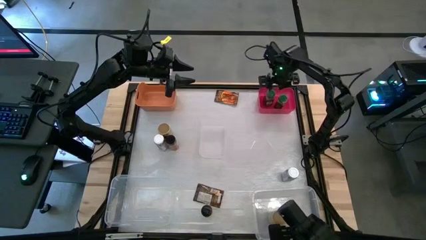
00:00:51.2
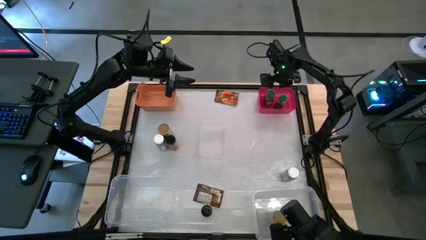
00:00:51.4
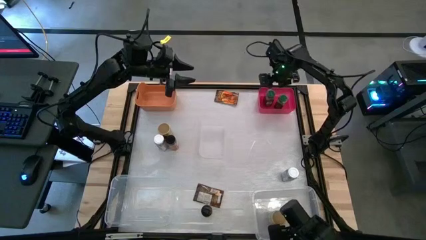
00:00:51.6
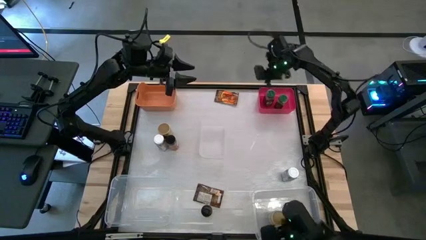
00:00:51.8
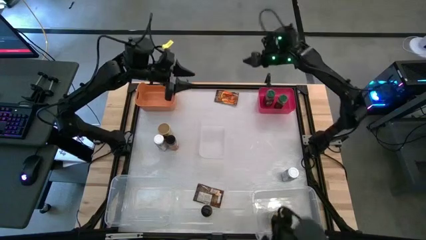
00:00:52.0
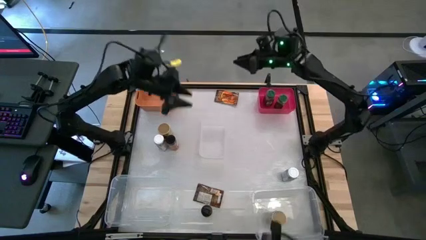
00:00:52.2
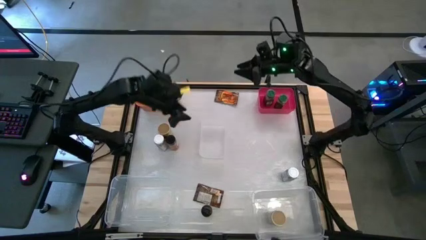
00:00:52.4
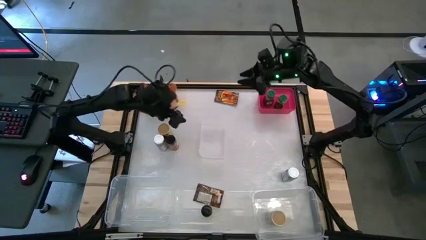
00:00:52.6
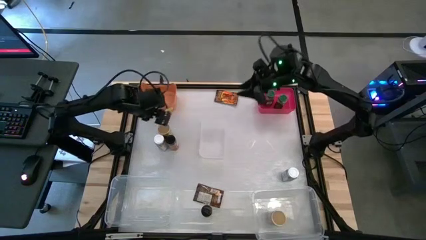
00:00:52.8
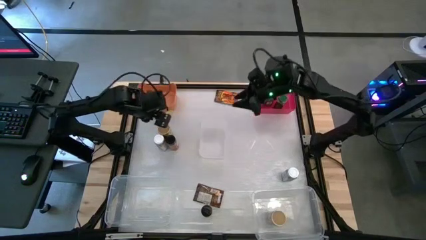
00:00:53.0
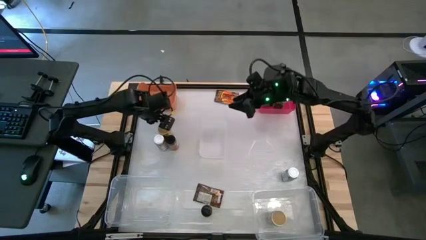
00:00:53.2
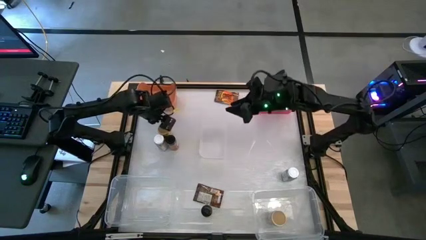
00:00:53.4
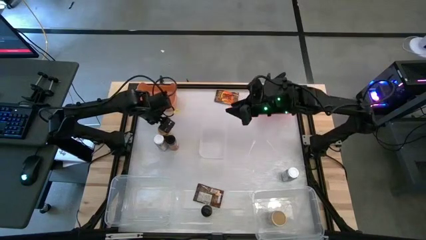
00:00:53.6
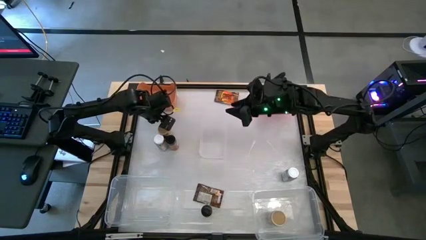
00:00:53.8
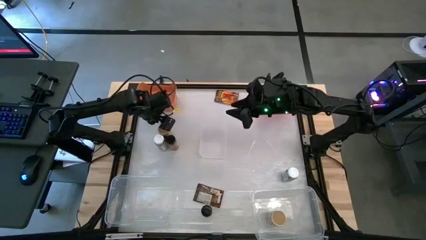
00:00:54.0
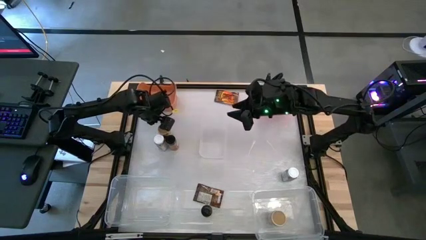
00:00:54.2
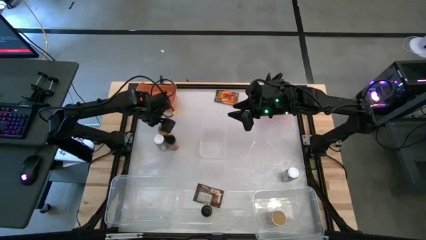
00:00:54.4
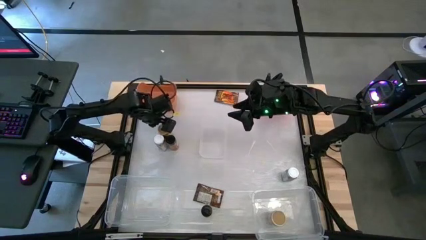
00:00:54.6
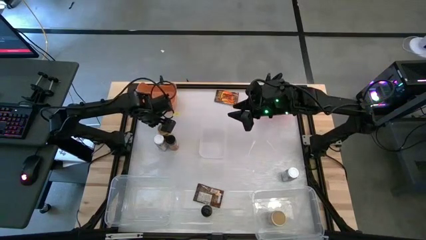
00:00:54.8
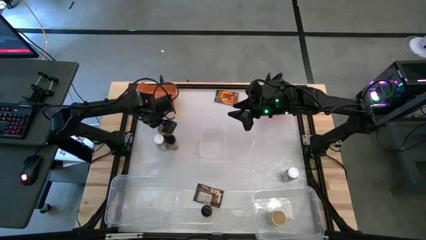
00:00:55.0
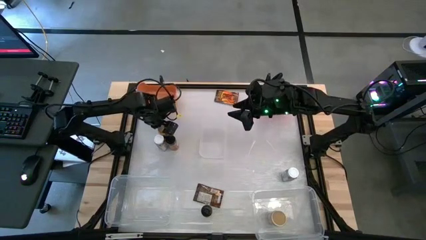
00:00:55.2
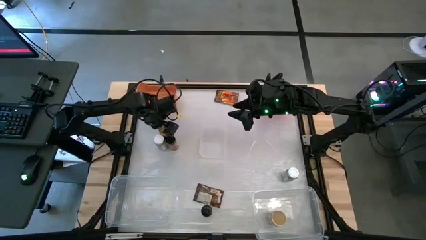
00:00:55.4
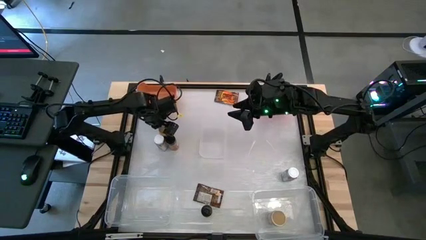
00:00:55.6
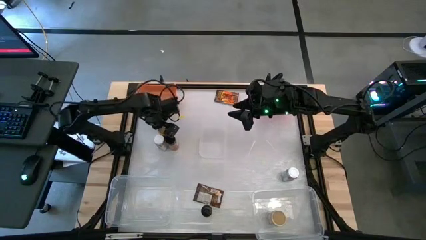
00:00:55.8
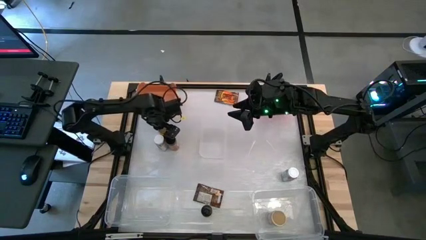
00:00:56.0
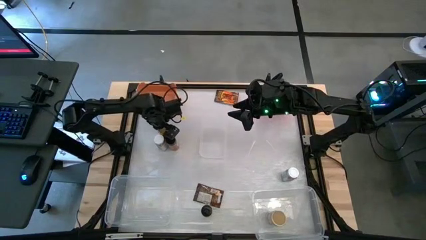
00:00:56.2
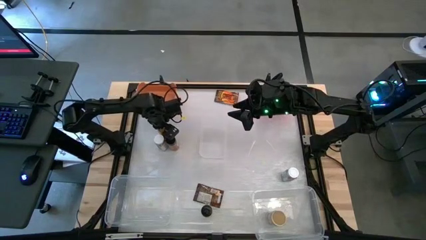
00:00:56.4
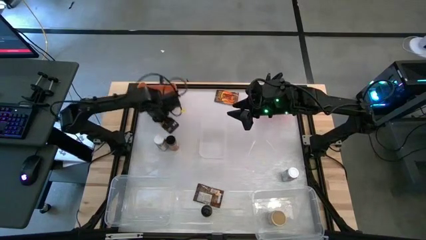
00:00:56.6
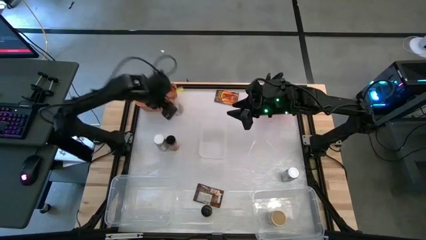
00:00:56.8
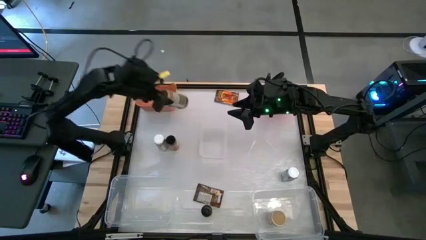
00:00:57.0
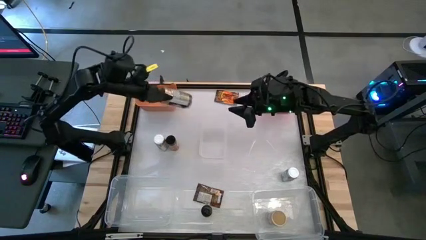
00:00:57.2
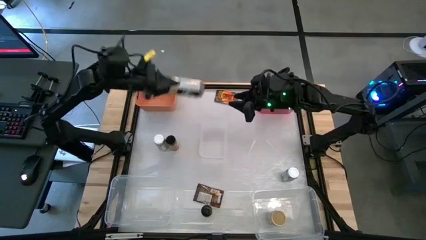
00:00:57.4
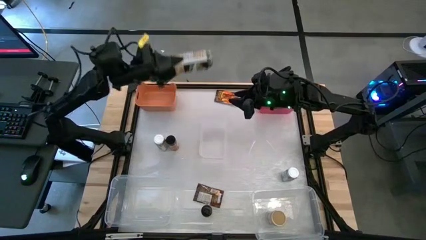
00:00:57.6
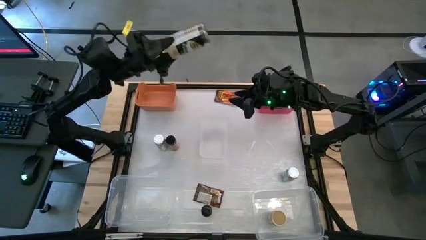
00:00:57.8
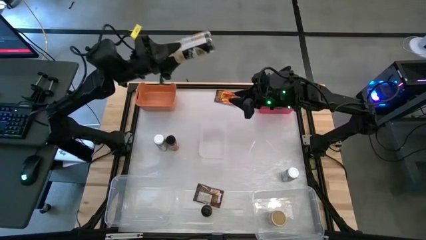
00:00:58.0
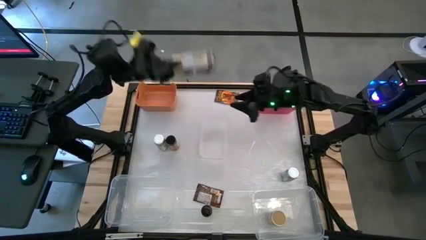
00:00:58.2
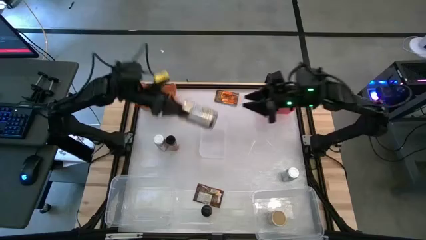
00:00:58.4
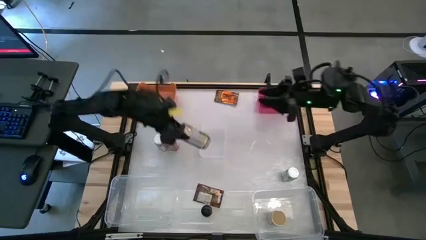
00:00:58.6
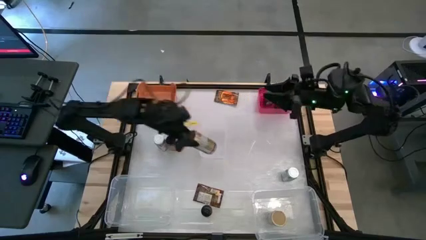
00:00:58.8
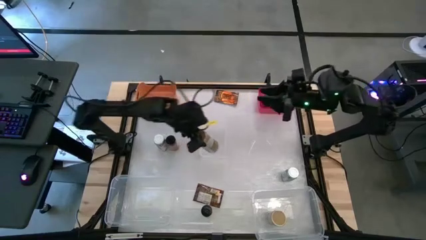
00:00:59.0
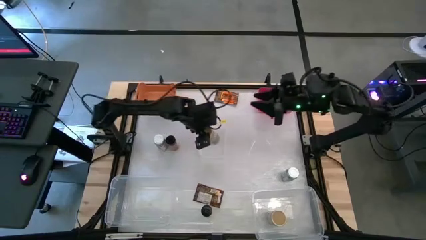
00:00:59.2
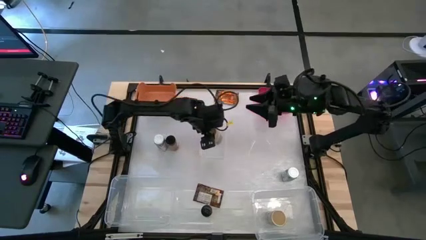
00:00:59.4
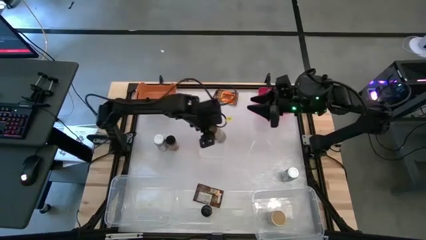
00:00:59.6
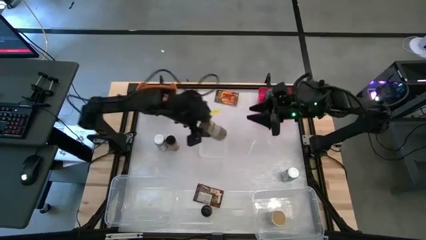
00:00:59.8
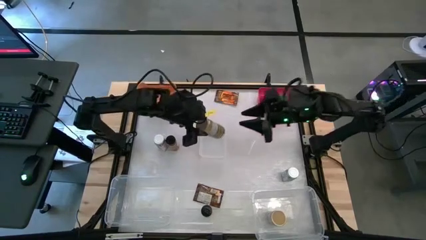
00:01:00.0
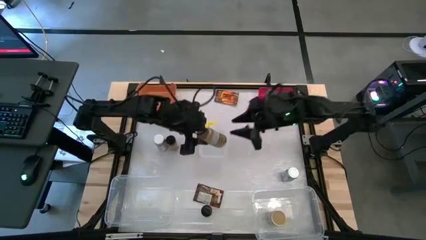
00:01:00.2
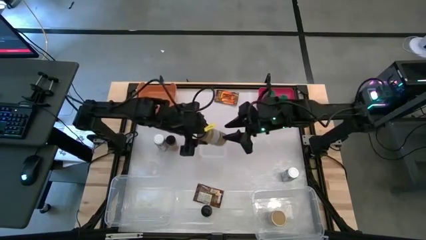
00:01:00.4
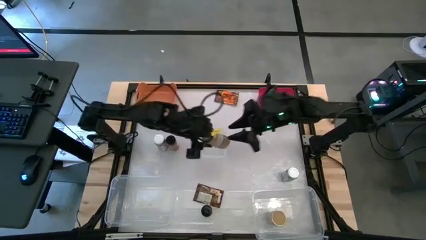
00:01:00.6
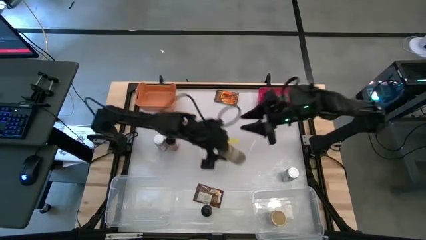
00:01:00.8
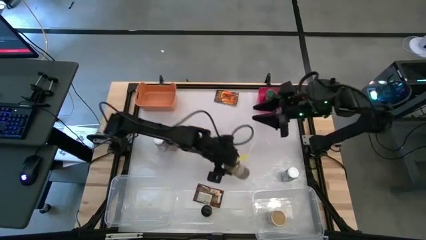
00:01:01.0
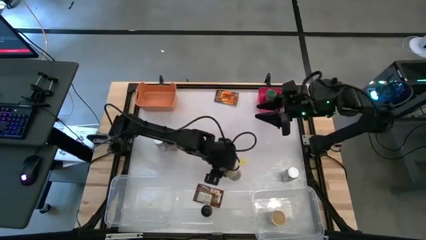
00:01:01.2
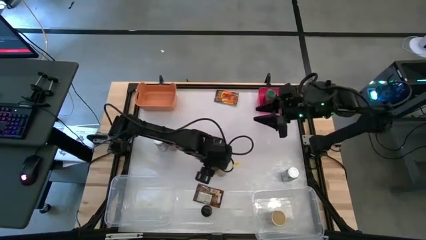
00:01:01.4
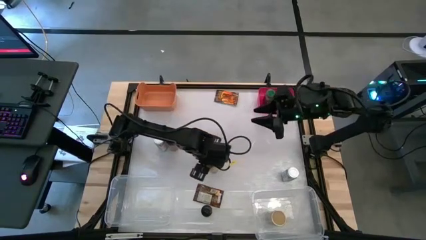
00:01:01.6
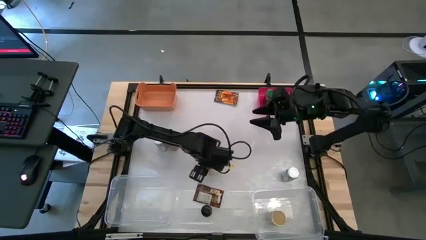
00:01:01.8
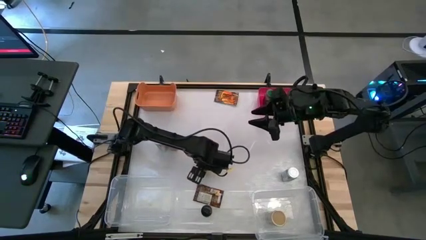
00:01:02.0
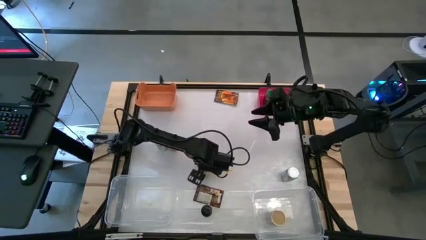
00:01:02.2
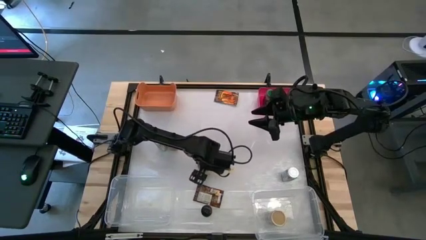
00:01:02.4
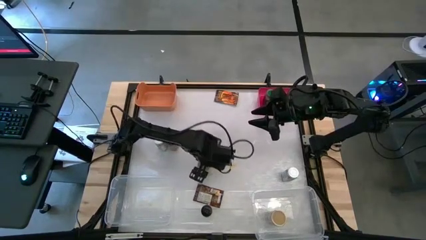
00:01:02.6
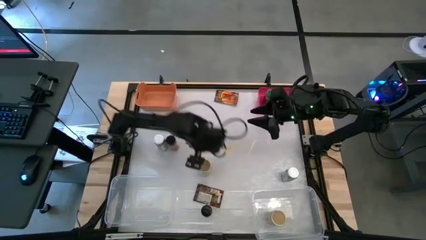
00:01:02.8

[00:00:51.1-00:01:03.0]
Task: Sort spices by type
Put the gold seasoning bottle into the right transparent bin

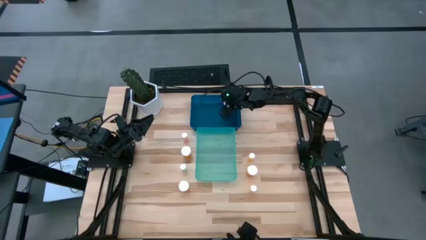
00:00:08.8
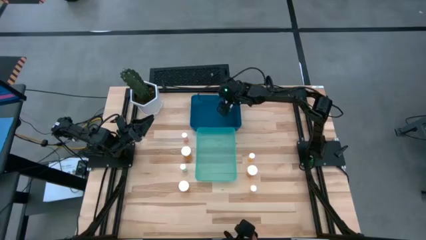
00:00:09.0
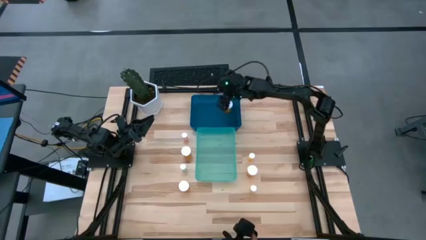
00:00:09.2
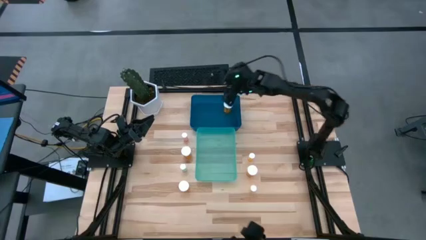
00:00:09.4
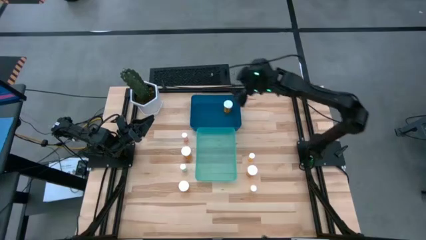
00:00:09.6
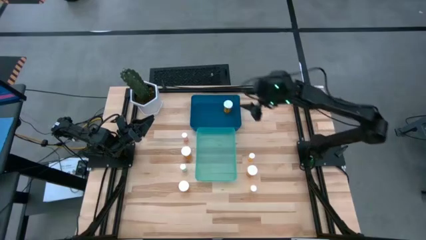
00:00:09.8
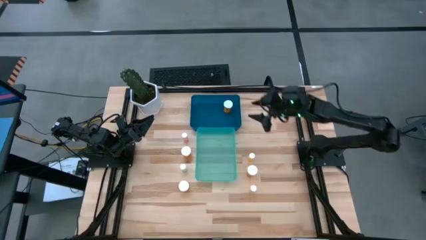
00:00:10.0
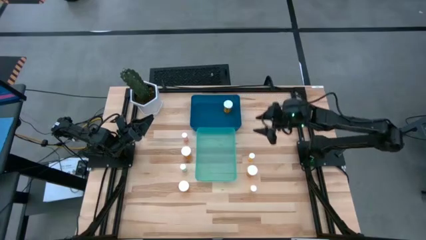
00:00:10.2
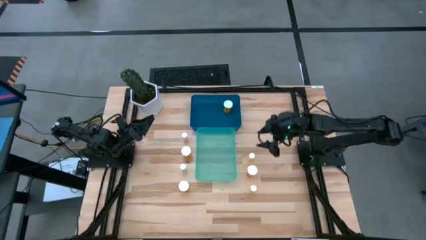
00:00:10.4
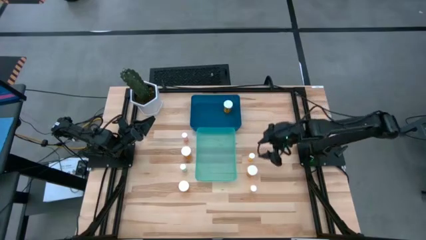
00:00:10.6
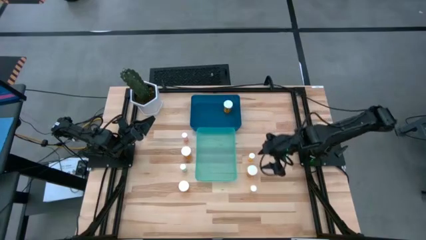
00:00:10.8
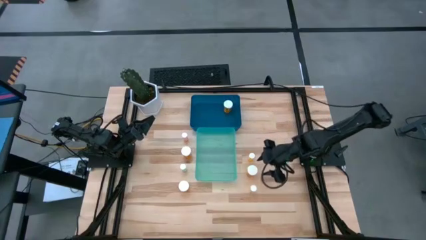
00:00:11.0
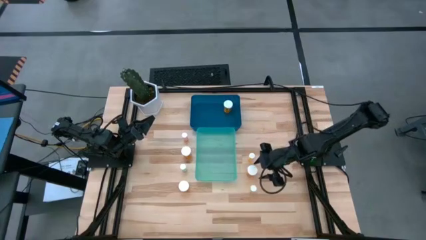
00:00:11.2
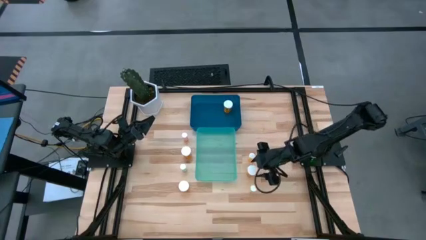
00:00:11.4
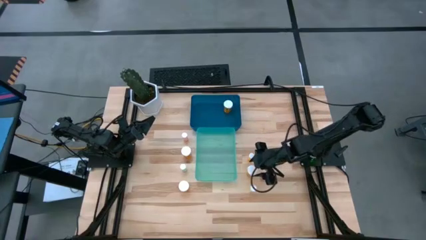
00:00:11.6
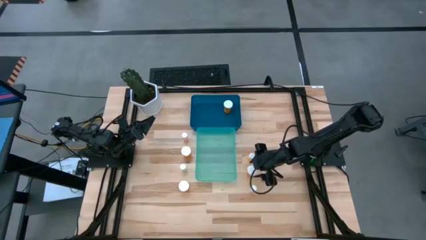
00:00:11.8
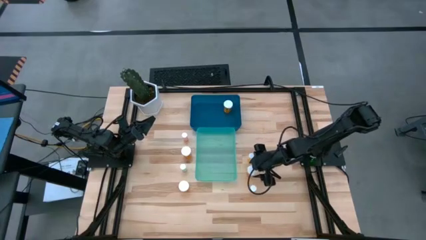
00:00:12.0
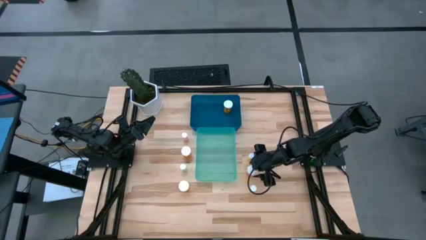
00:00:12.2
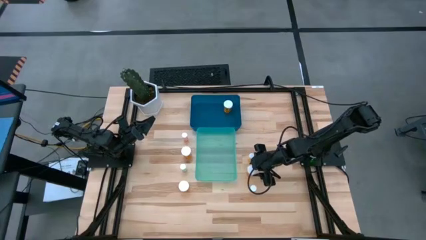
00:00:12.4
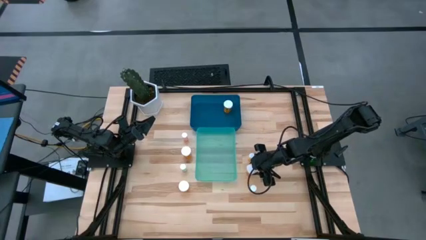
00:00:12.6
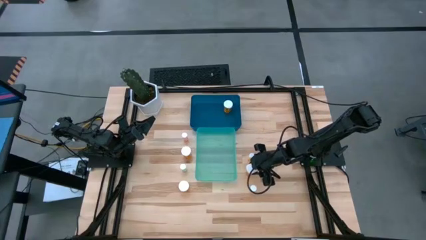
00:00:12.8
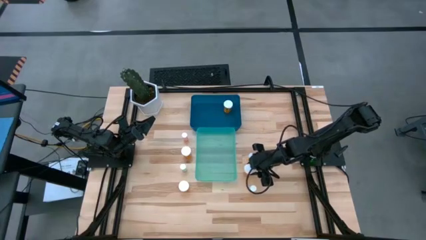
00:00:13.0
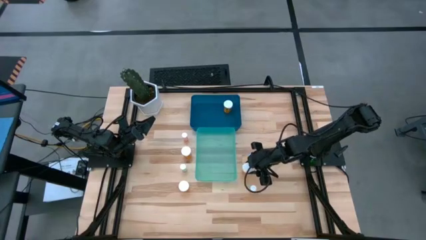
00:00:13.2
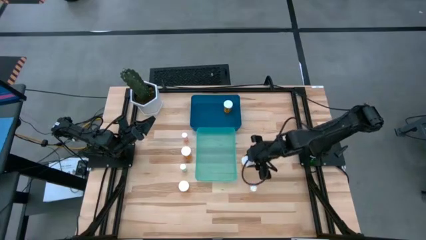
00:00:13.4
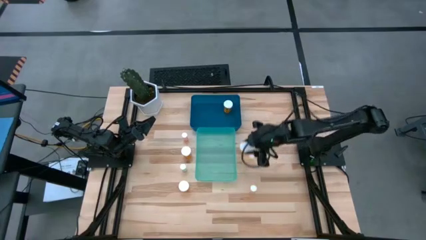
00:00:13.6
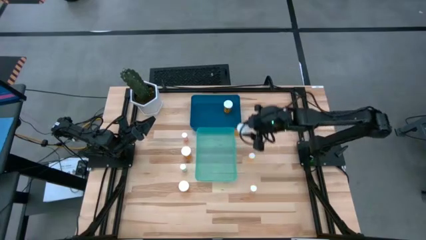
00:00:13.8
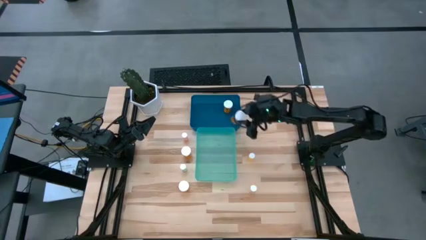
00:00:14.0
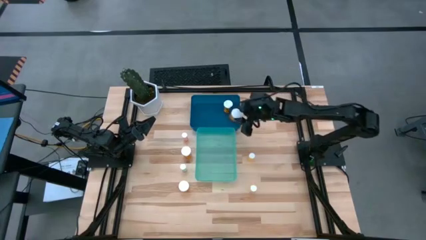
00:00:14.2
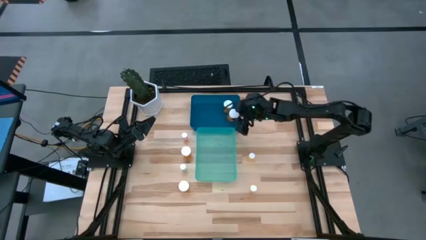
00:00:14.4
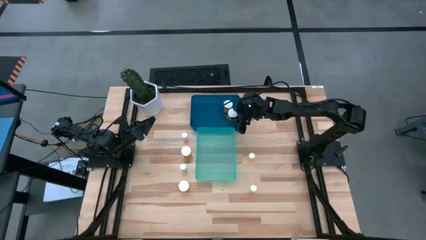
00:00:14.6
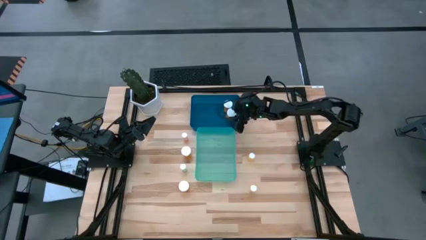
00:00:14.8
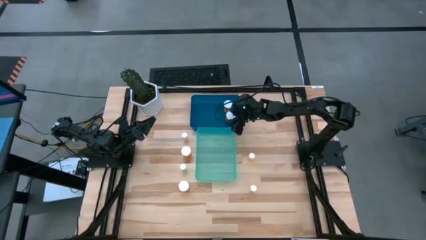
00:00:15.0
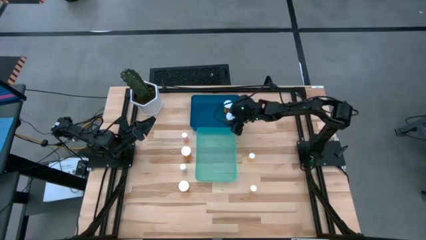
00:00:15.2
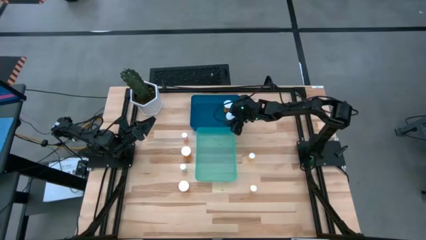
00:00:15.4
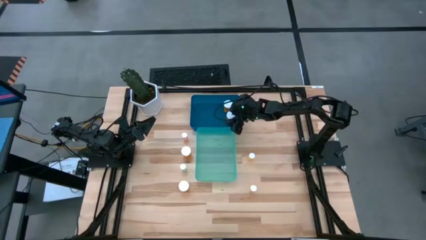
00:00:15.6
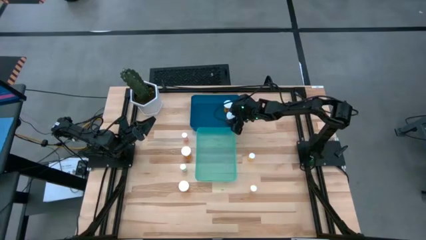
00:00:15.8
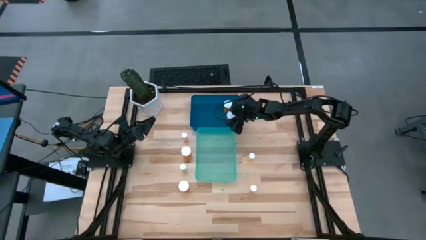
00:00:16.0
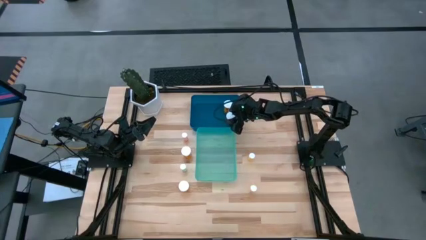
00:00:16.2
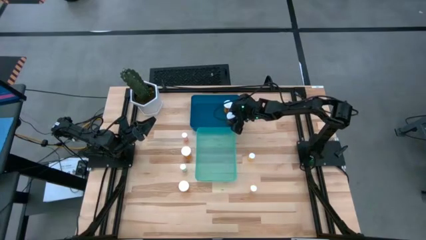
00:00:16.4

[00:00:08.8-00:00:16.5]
Task: Pick and place medicine bottles into bin by pill shape (circle, oval)
Put the large orange pill bottle into the blue bin
